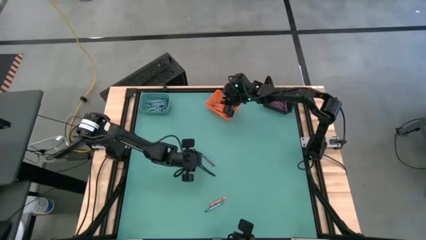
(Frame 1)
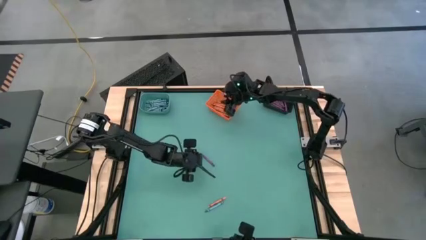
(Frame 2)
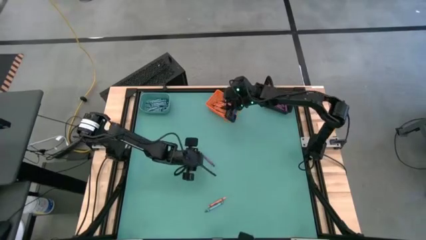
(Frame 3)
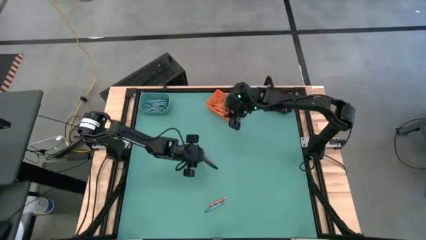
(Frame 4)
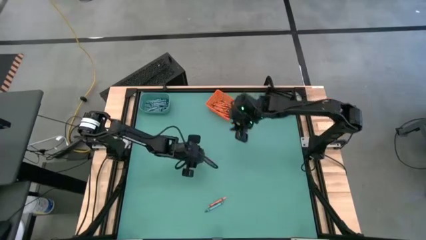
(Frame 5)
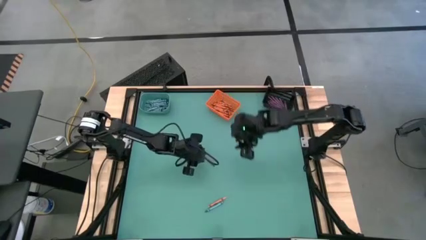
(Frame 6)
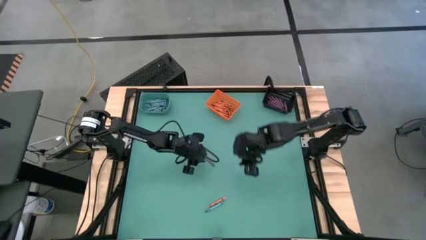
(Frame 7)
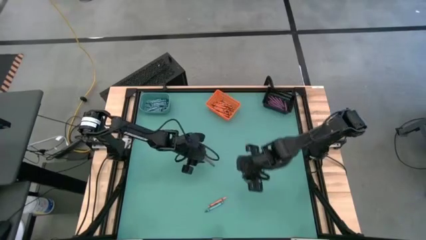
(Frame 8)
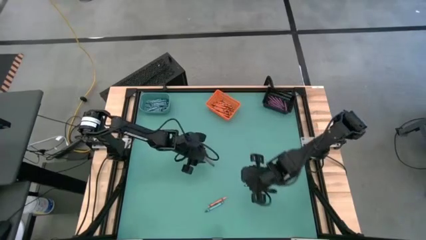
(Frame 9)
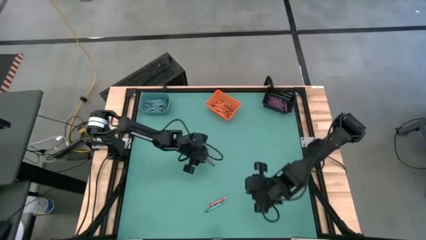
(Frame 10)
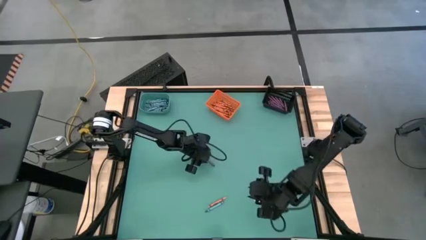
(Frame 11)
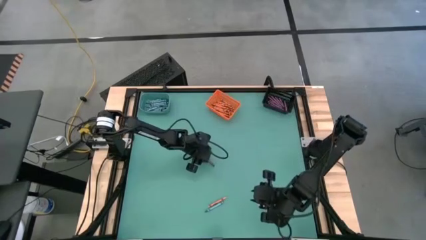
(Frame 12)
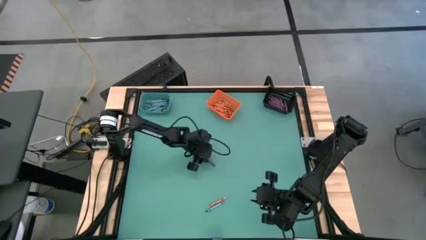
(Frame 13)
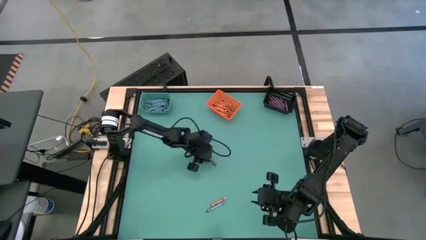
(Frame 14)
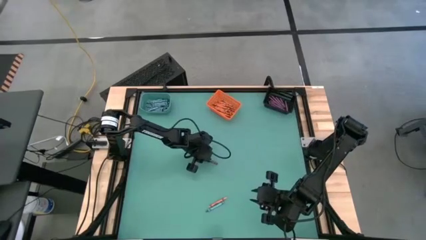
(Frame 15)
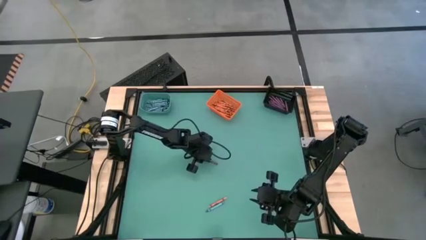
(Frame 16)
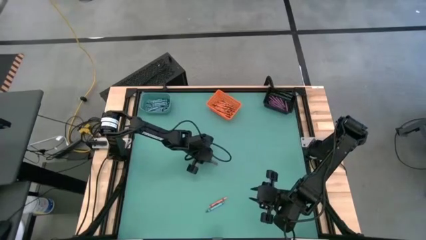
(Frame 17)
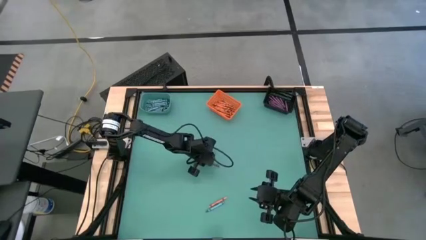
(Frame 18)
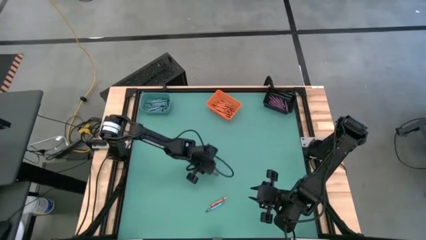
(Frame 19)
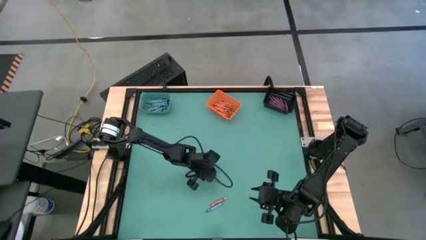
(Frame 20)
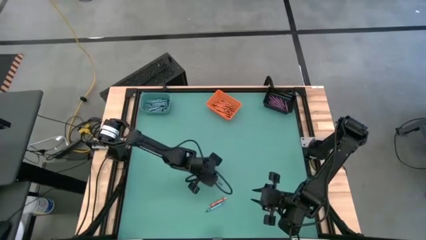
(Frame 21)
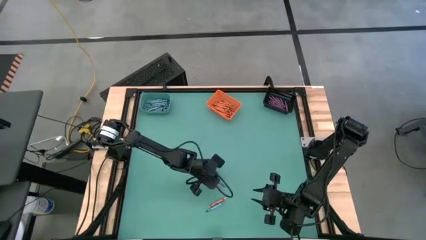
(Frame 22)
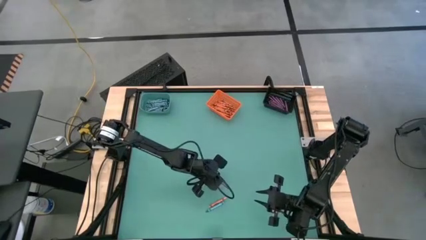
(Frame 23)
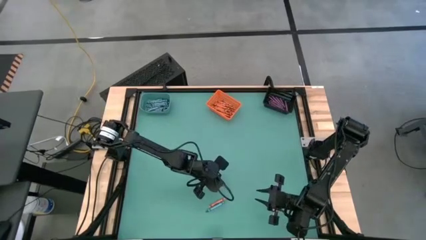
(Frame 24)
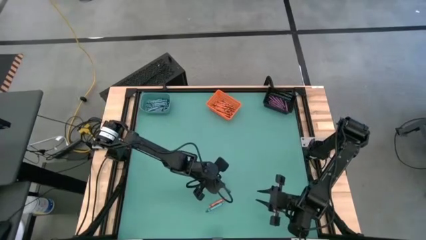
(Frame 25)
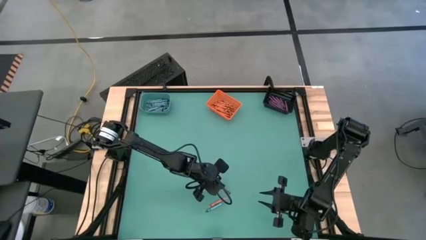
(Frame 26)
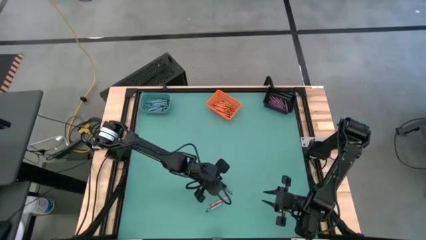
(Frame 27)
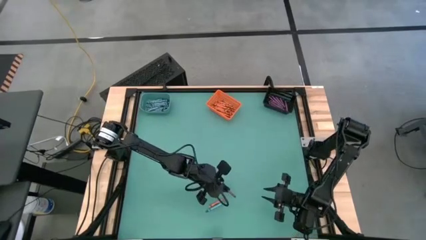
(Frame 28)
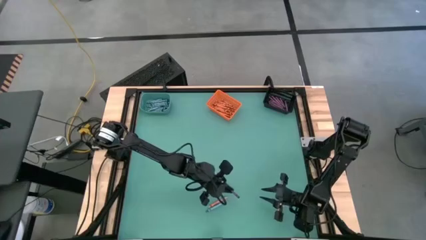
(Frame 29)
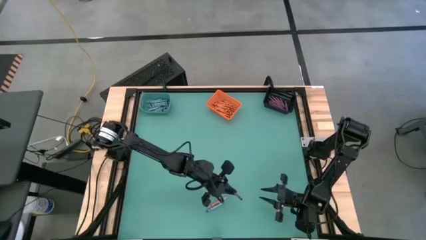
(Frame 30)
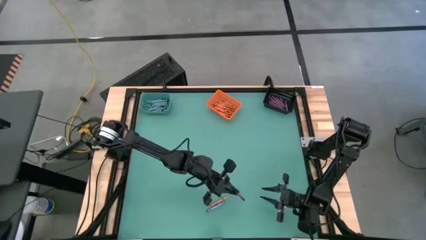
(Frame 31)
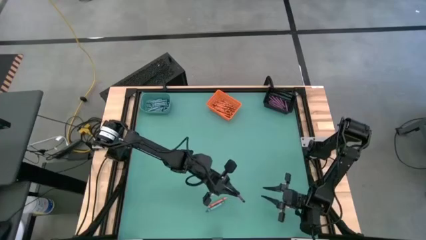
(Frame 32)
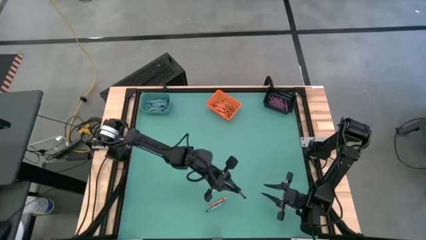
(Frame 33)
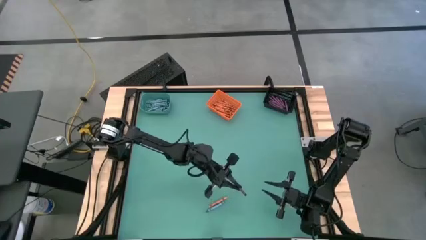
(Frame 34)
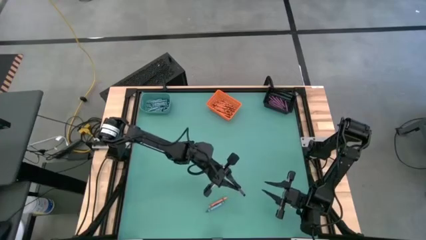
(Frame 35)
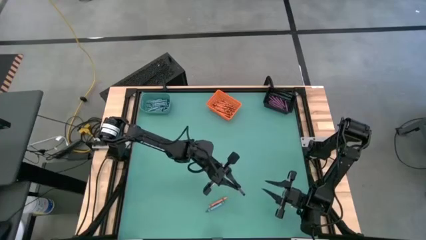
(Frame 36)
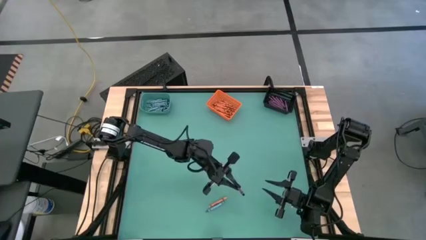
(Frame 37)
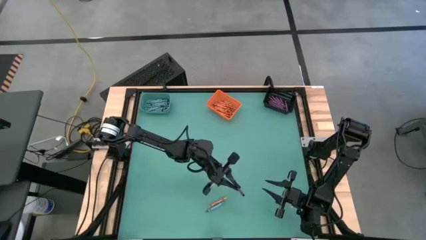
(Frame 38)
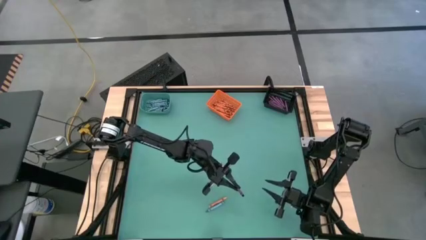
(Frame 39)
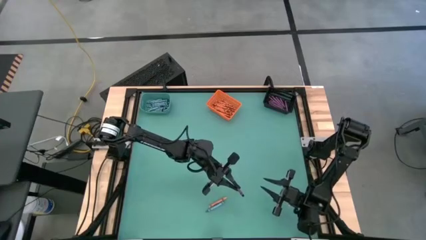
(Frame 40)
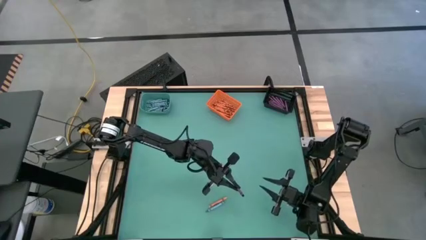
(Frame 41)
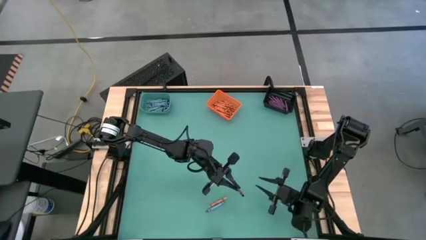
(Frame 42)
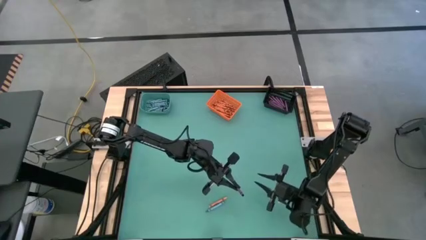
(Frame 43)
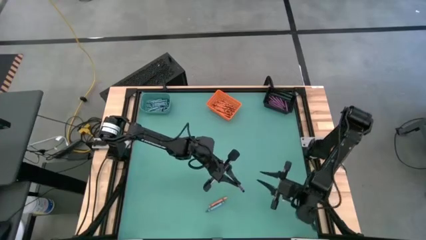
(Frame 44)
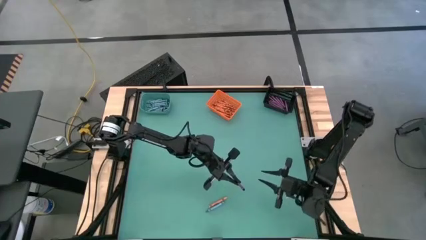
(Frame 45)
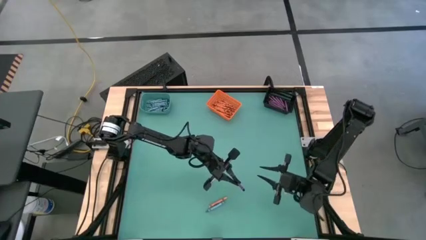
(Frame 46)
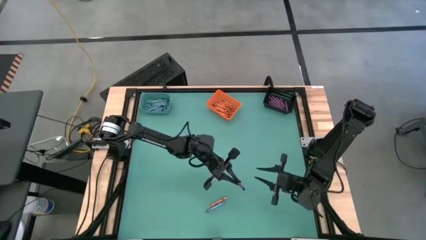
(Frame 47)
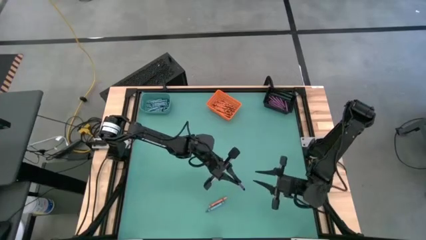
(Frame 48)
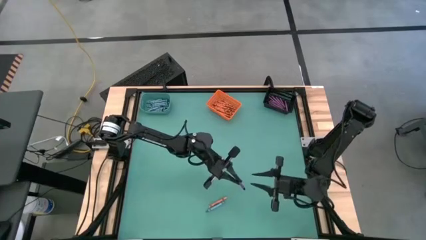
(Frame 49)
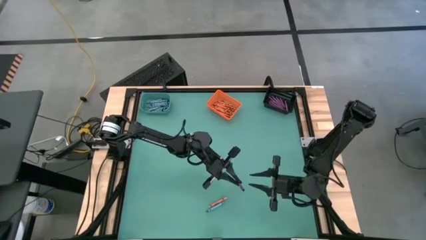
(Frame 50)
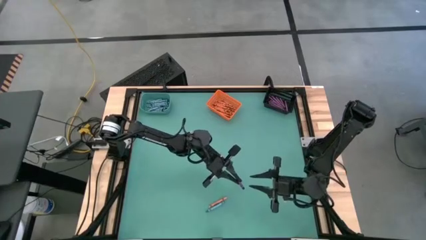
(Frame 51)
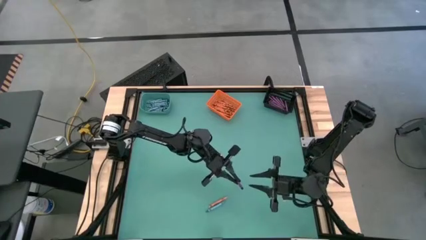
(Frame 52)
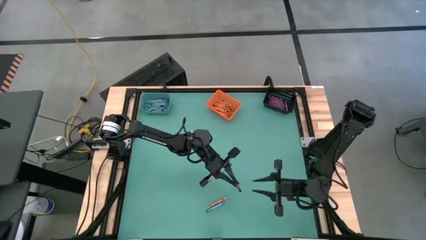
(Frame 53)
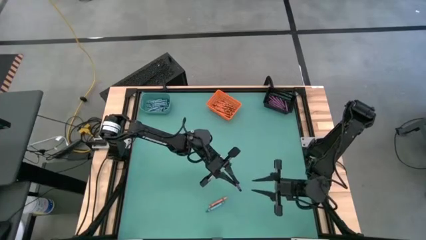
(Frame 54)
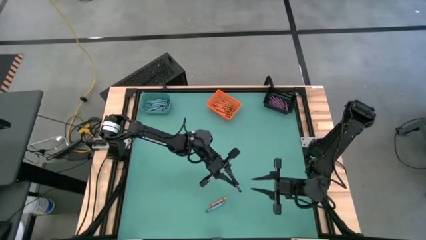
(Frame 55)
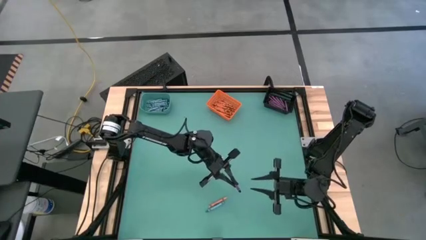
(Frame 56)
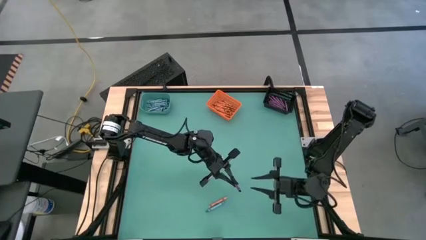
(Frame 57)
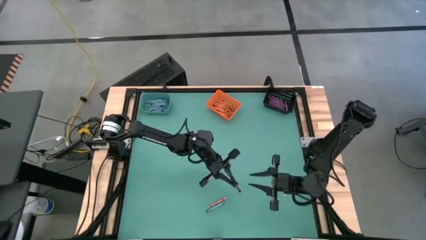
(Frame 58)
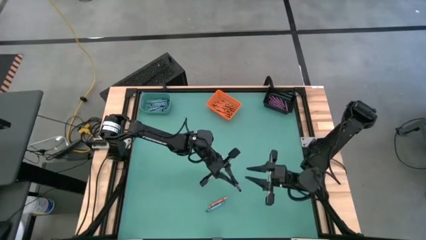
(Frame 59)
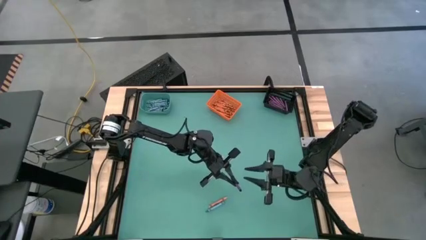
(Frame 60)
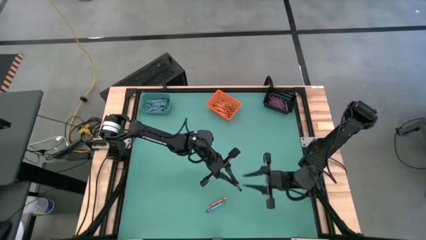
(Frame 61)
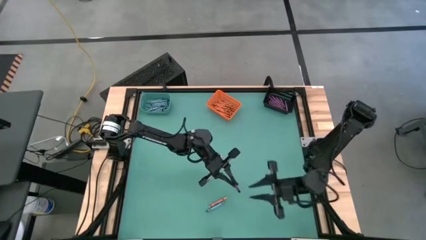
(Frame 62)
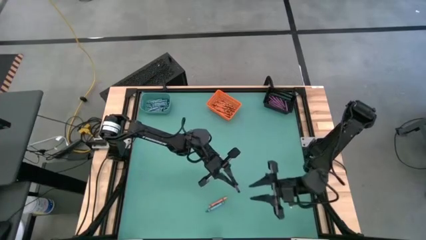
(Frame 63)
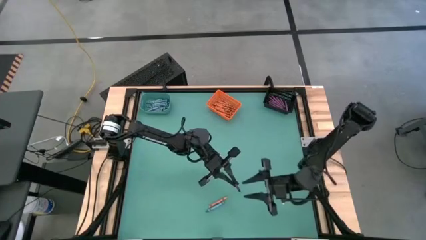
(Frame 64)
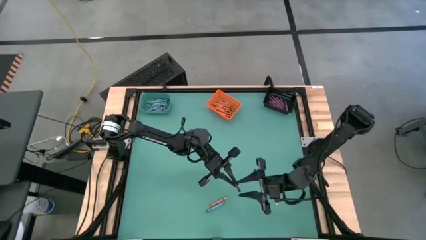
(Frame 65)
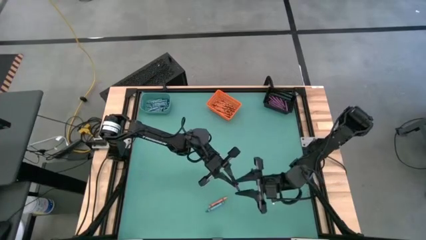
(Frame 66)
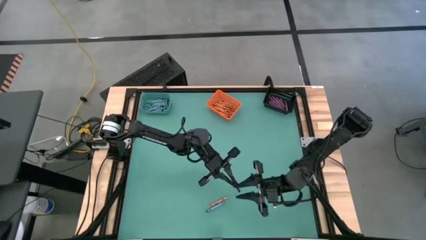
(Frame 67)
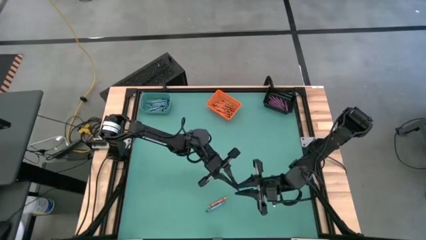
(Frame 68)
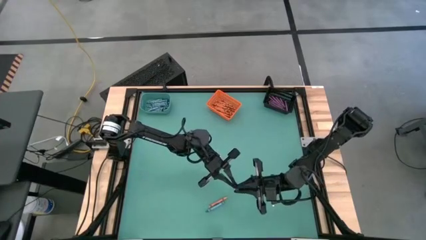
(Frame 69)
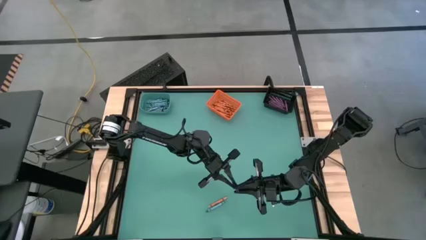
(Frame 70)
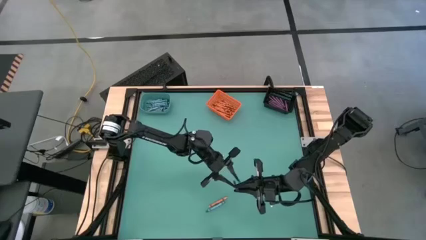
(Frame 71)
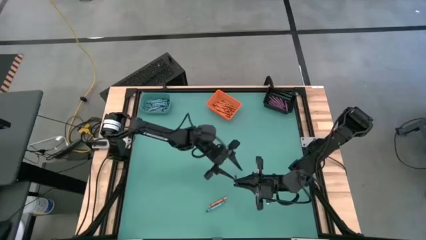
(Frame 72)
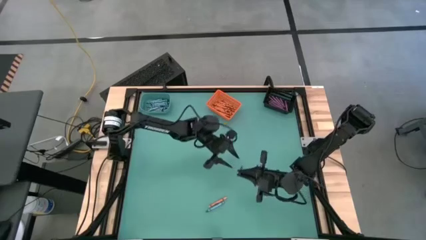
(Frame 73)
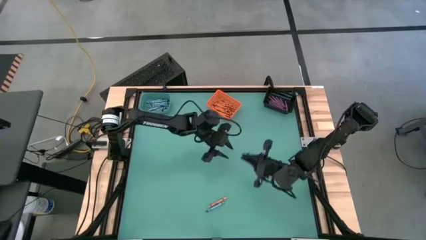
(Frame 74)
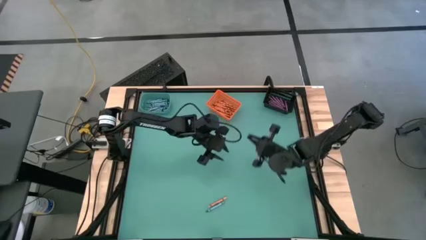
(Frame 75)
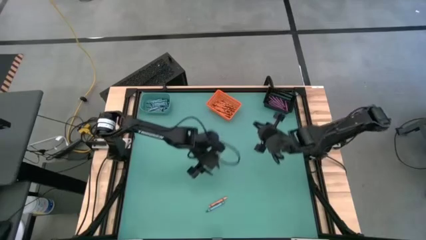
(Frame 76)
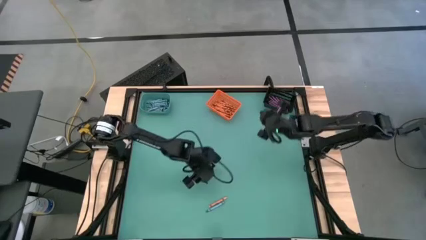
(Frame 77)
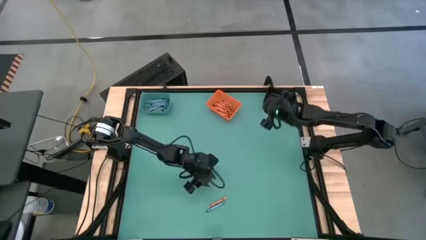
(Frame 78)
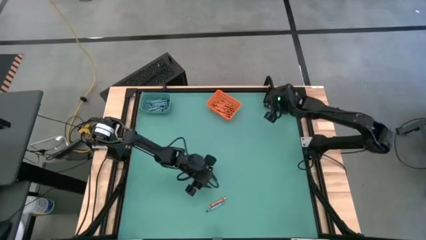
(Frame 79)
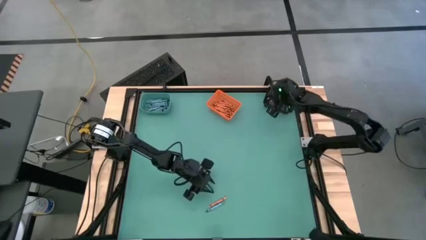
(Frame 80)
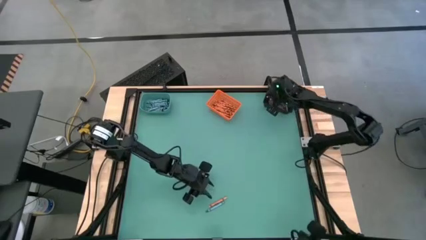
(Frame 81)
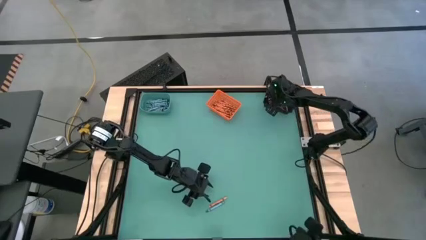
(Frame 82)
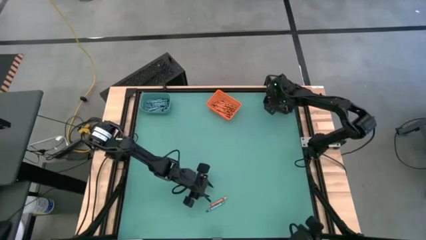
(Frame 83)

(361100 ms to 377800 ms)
Task: Sort crayons
Put the violet crayon into the black bin

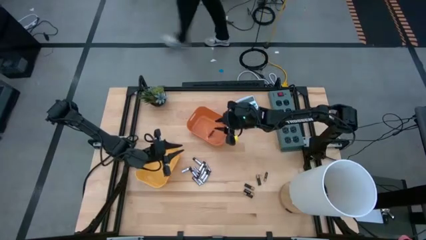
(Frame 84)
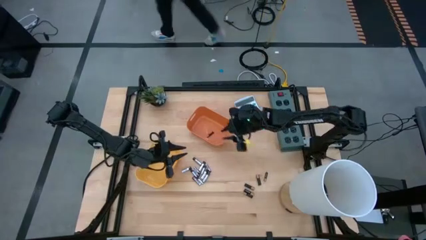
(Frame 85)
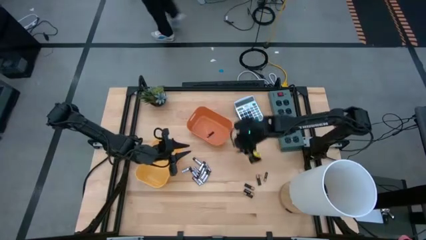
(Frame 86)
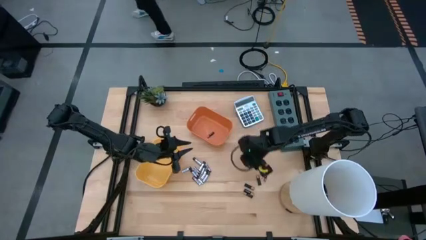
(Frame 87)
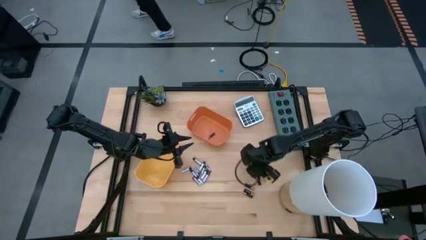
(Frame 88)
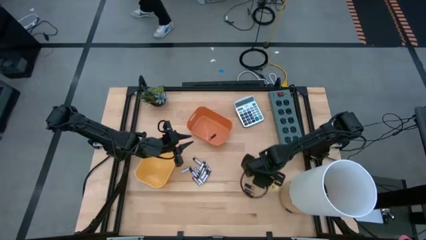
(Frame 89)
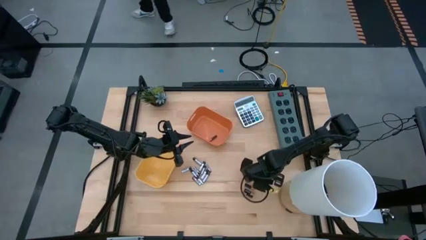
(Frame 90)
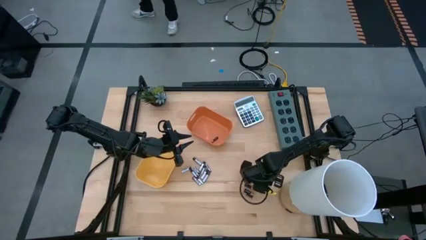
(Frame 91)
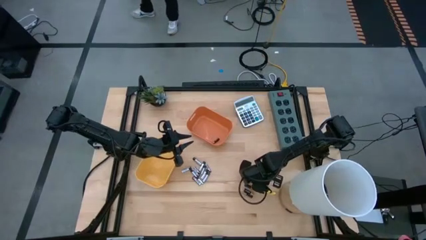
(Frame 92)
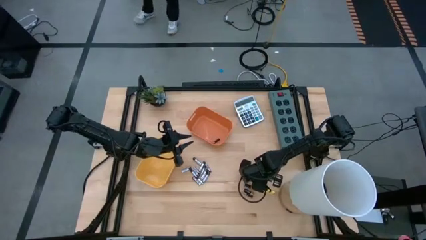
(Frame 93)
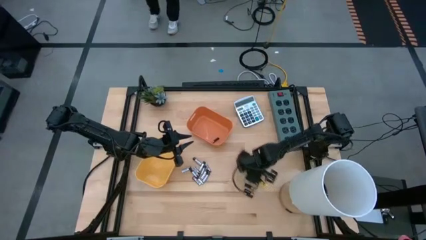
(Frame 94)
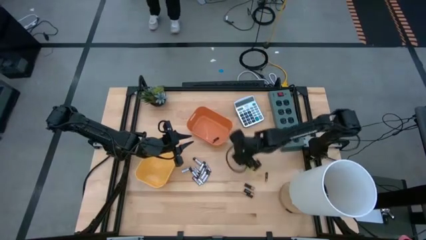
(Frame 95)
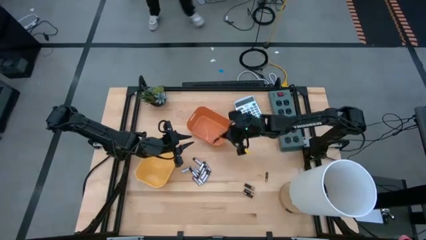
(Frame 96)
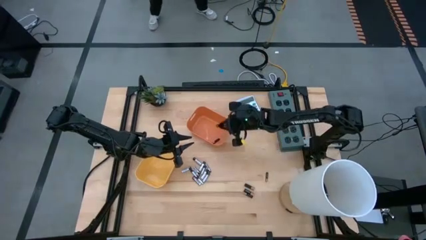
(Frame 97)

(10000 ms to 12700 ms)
Task: Sort batteries
Put the black battery into the orange bin
